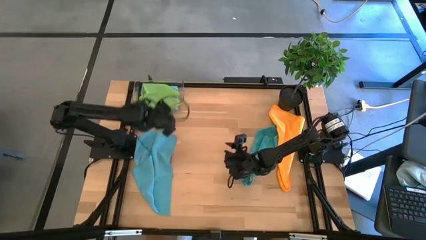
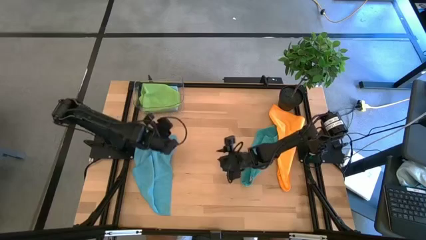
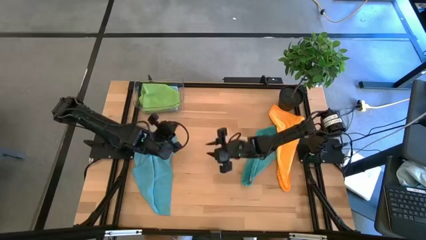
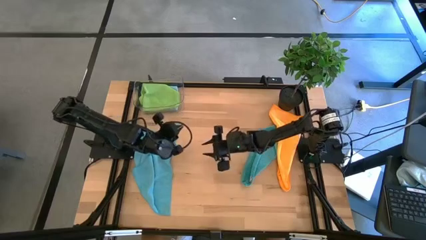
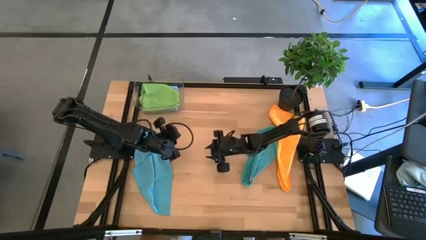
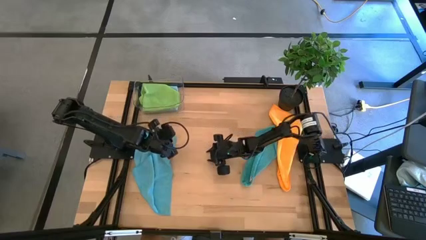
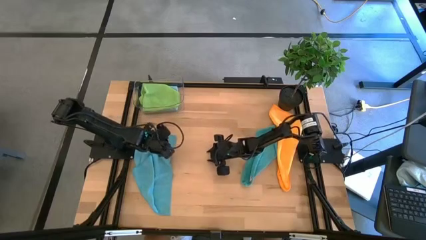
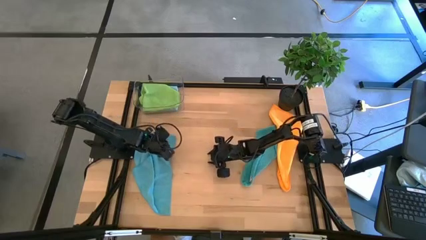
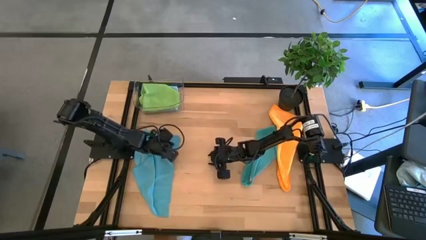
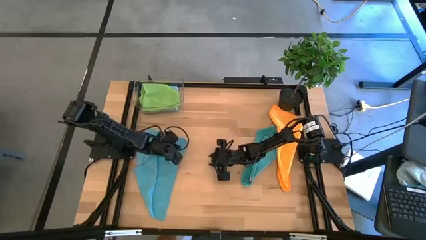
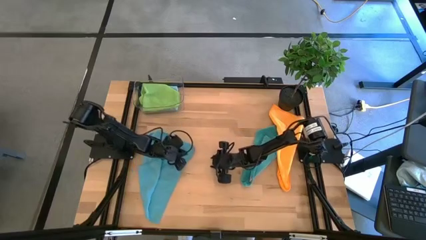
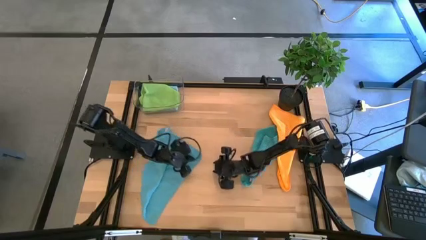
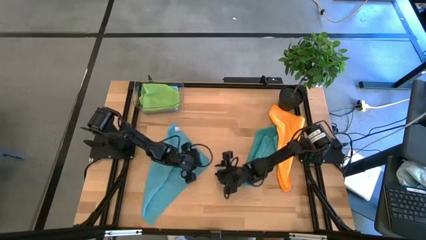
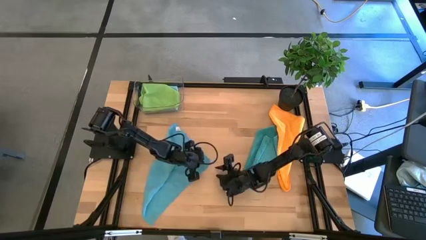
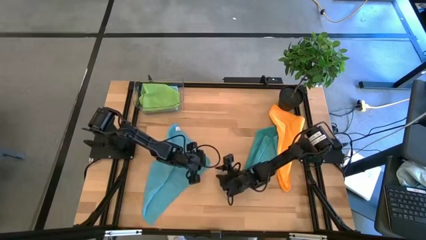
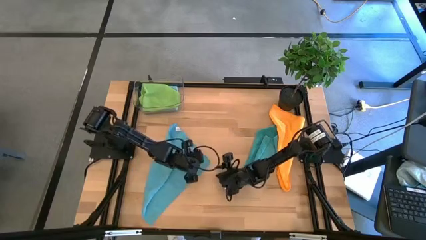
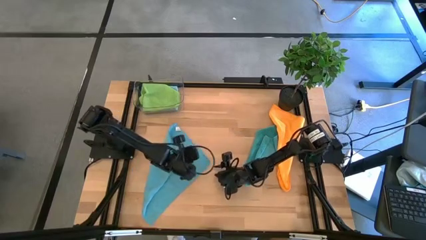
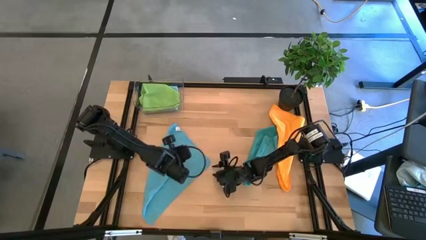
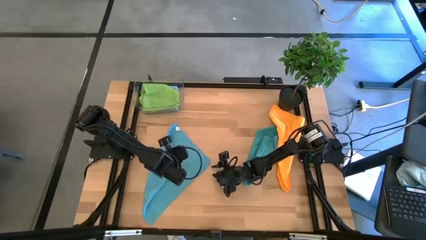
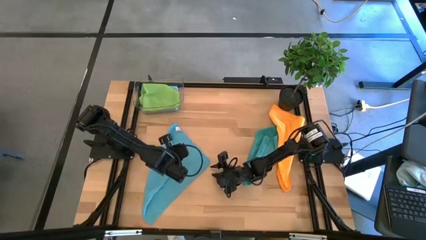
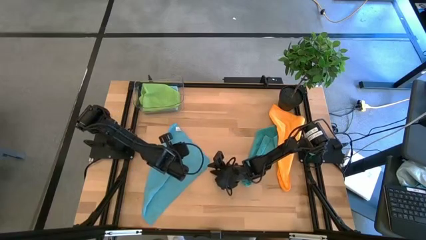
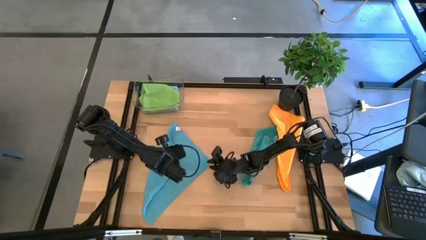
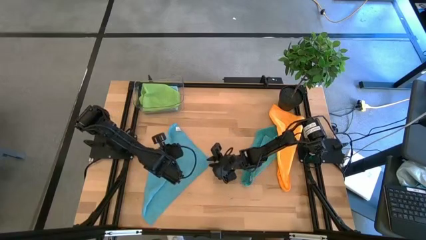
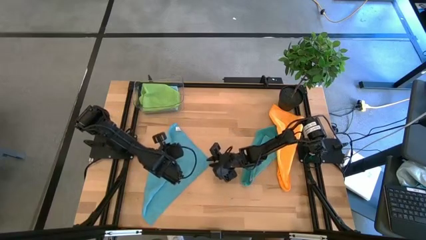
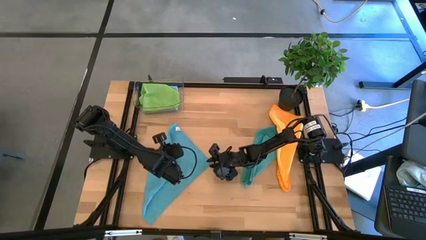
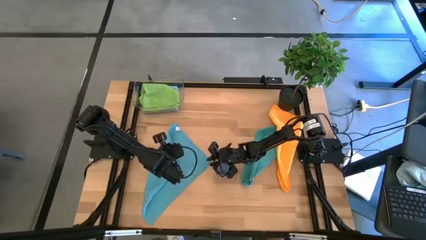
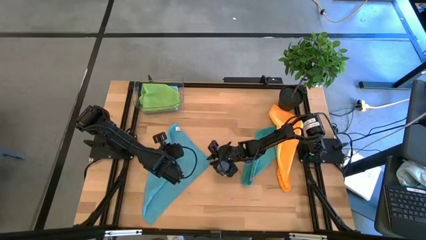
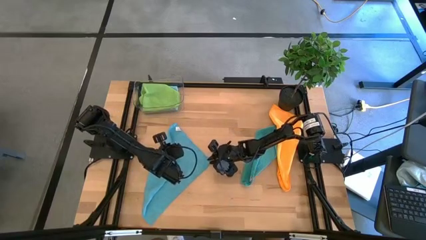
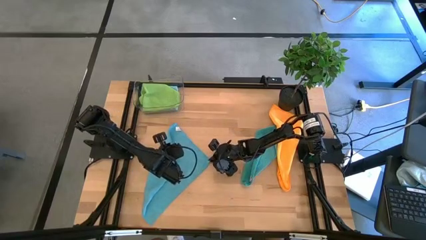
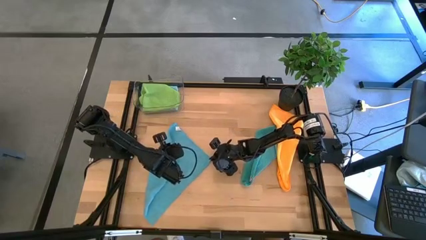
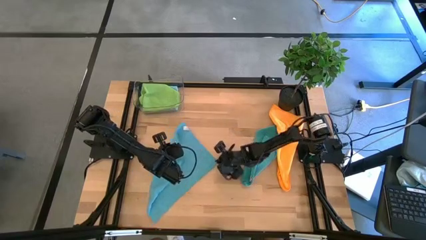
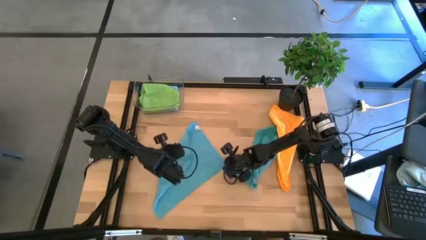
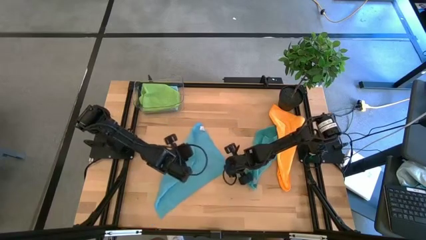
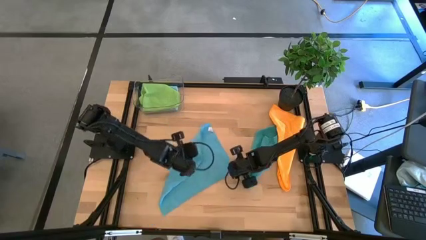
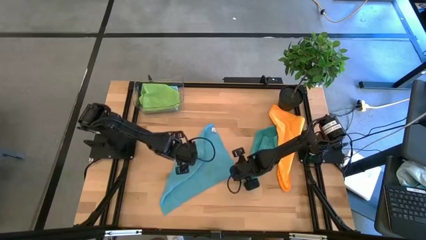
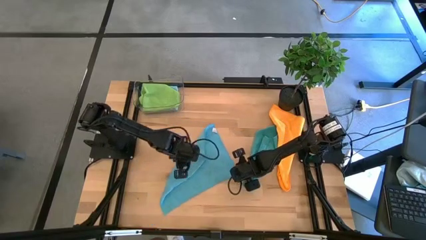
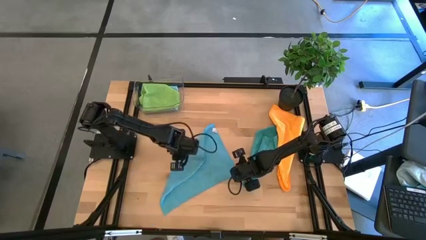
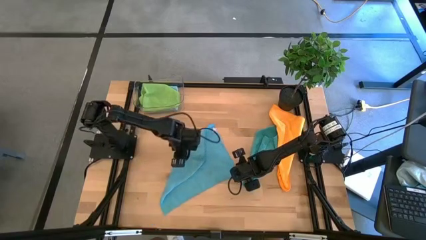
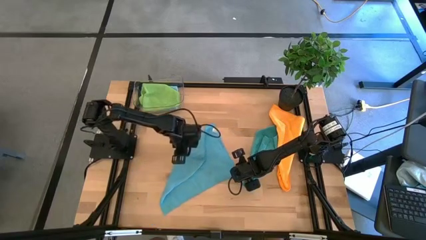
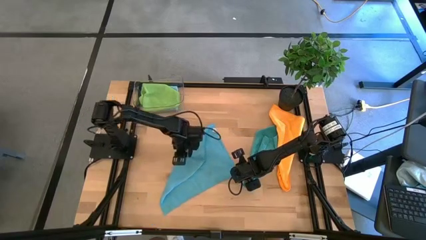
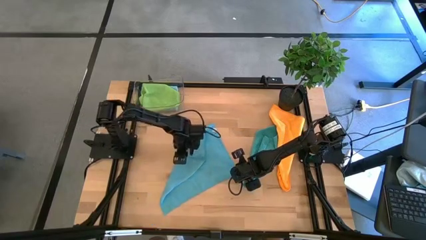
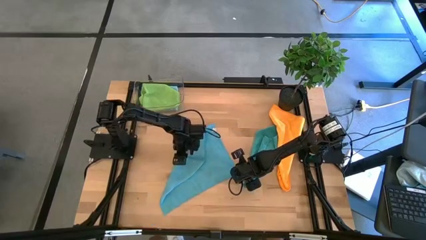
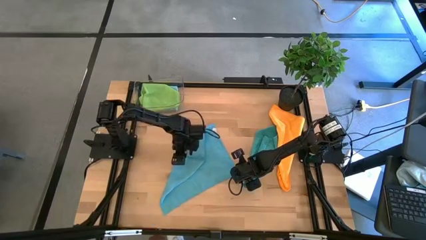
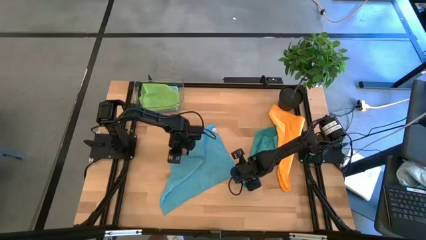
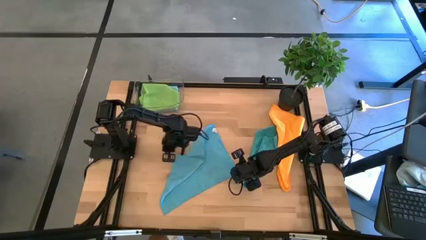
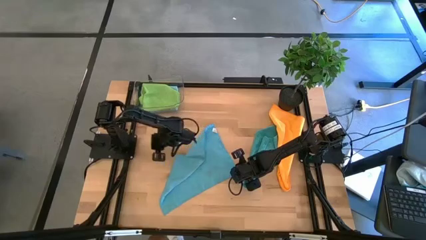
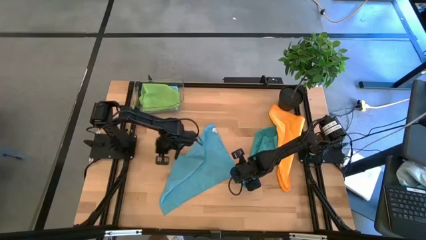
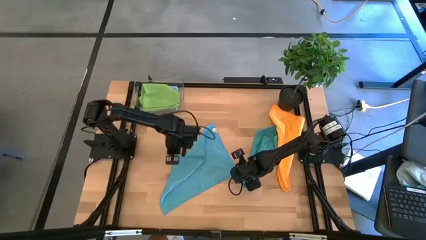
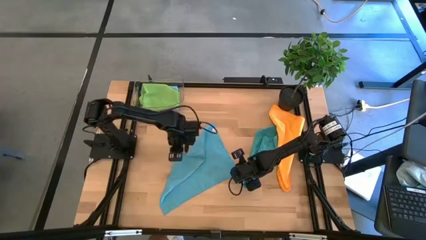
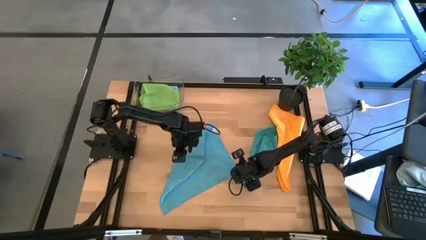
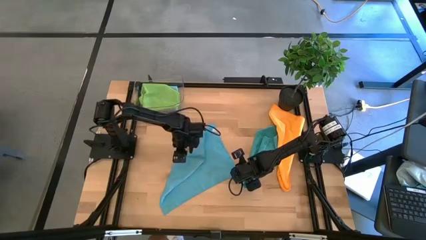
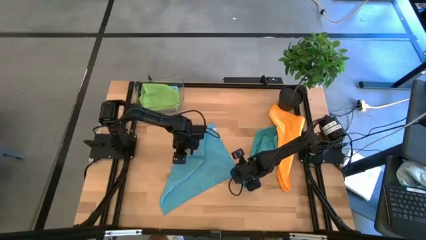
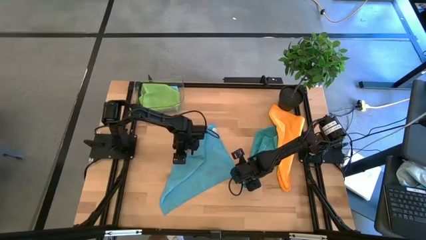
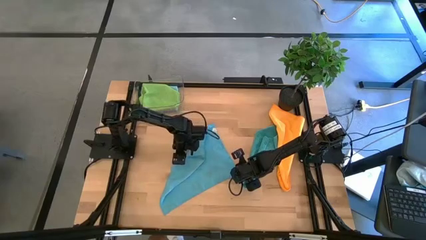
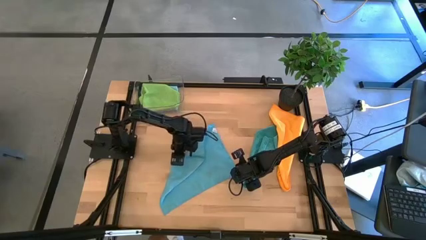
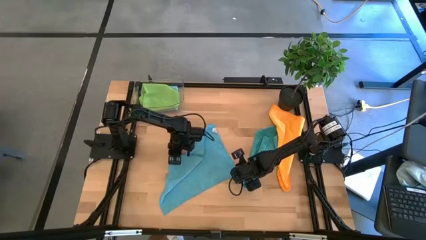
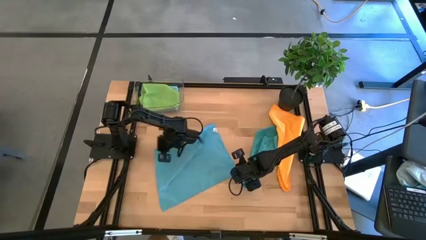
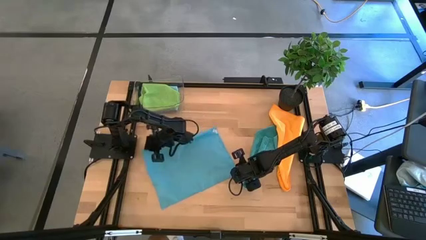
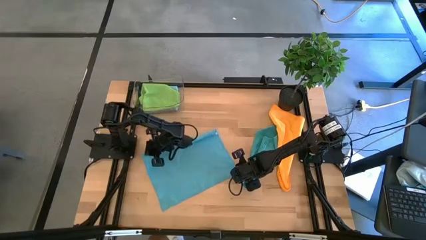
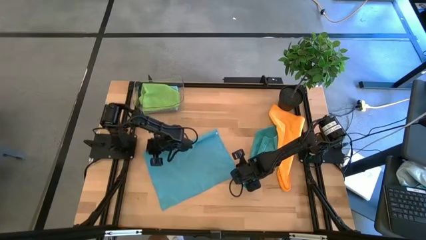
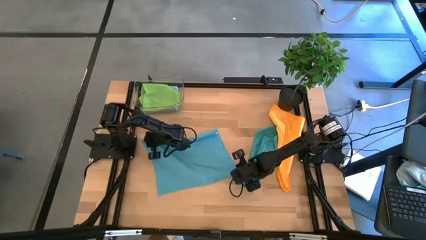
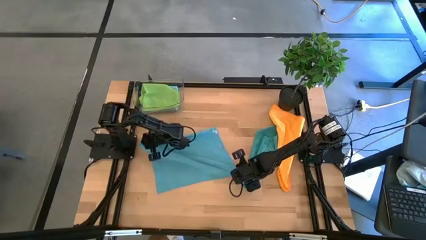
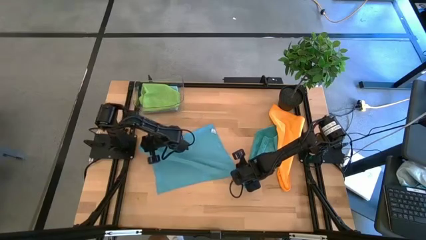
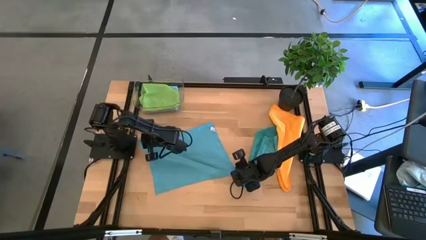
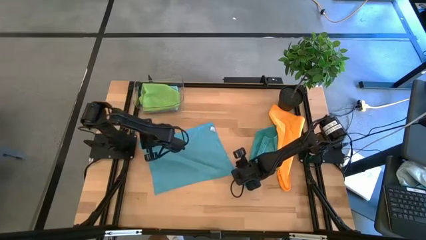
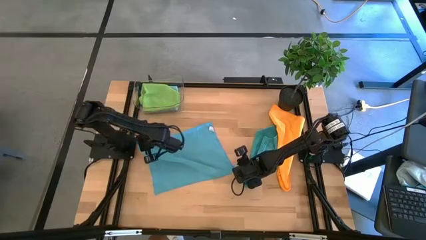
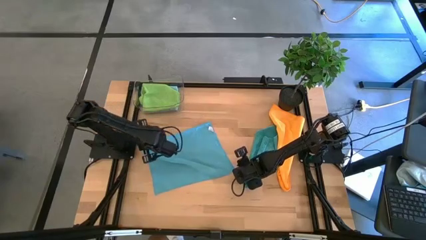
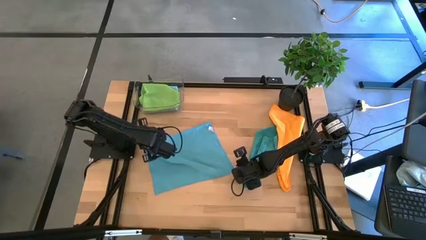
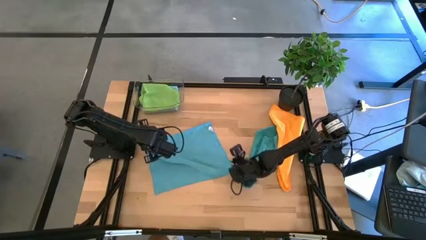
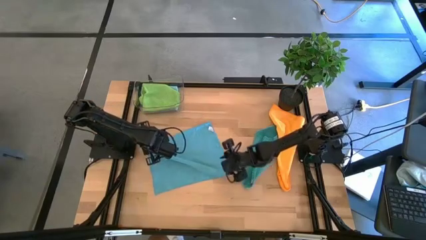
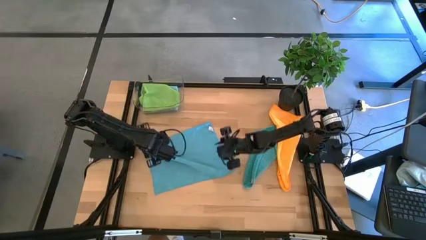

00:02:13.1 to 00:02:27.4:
Task: Fold microfiber towels
Fold the light blue microfiber cloth

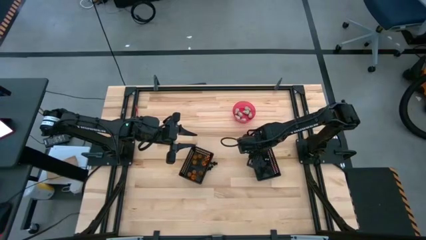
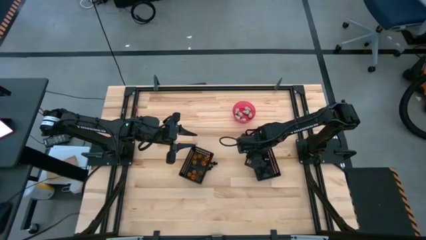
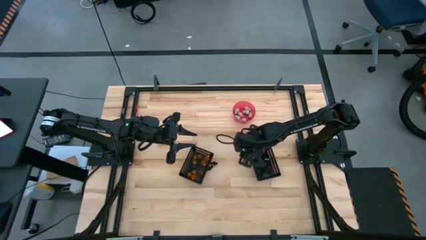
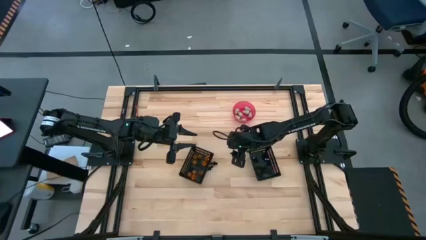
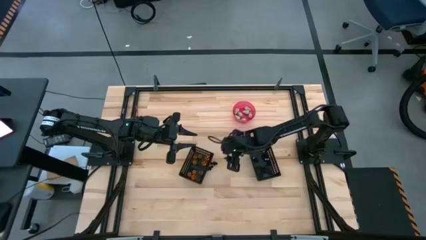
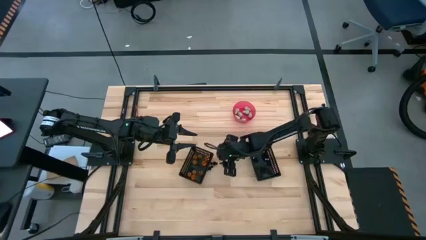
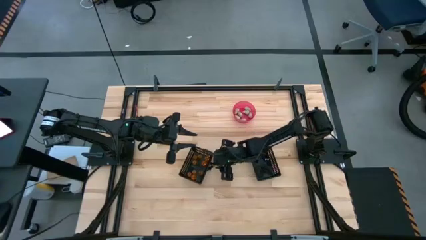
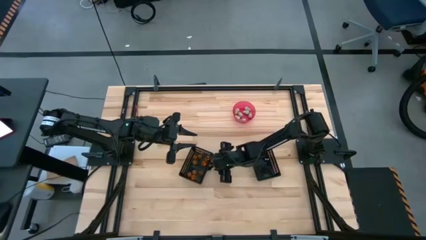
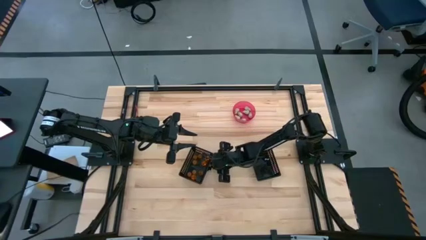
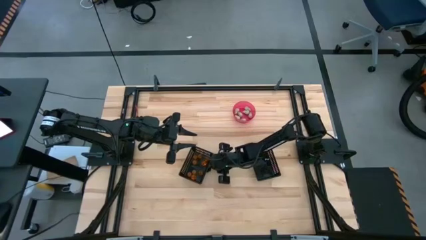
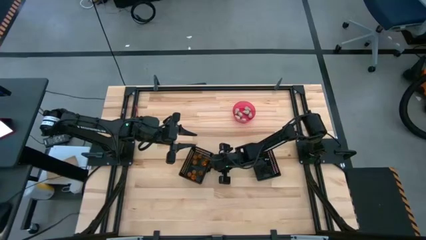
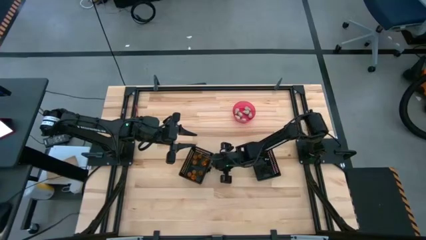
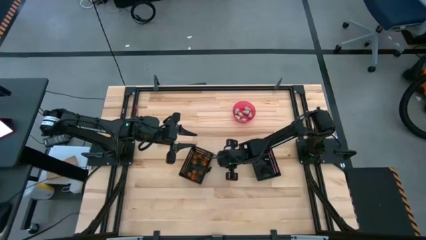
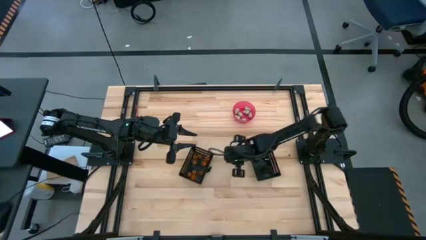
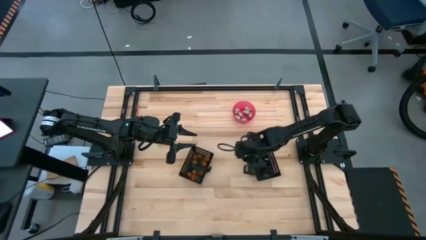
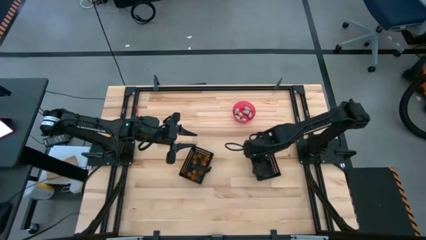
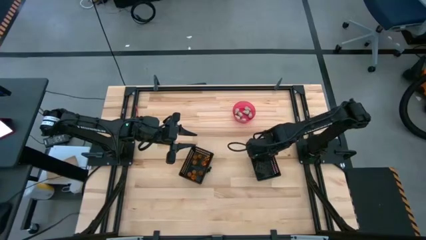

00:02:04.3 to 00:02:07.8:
Task: Sort Halloween decoration
Put the black skeleton toy into the right black bin
